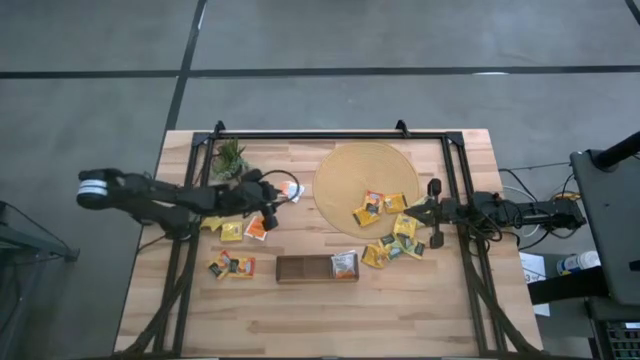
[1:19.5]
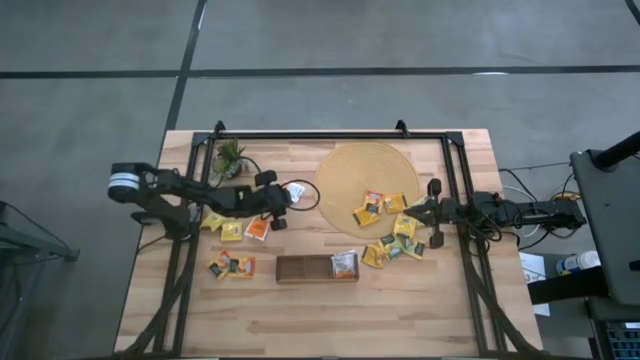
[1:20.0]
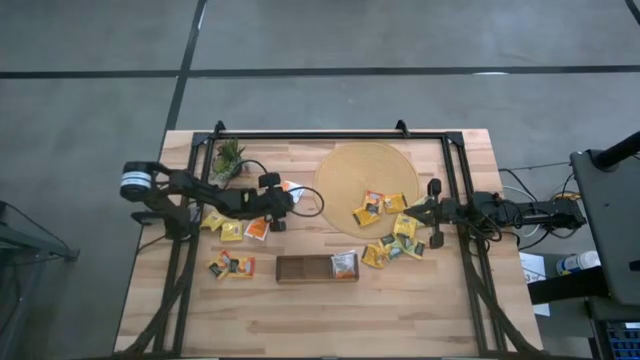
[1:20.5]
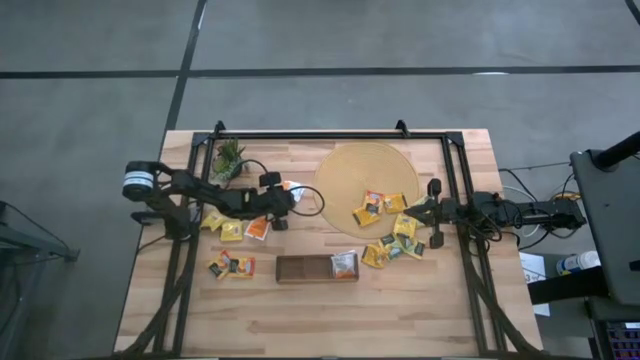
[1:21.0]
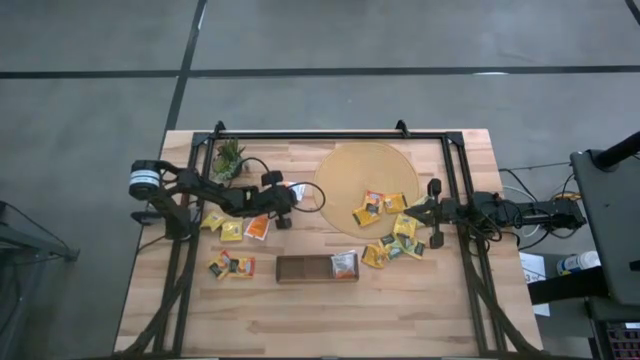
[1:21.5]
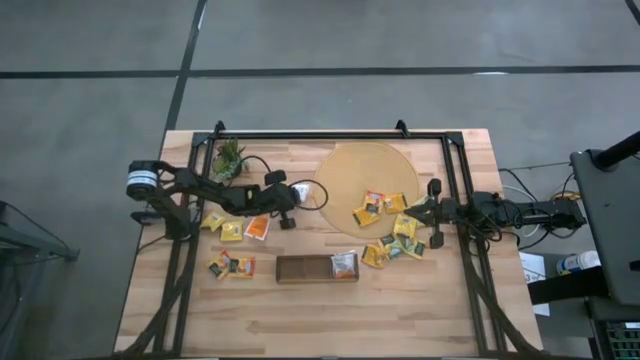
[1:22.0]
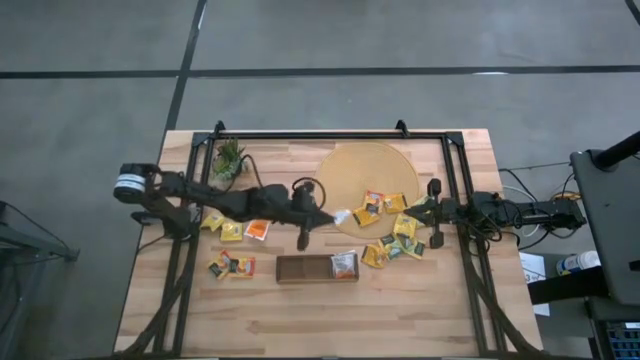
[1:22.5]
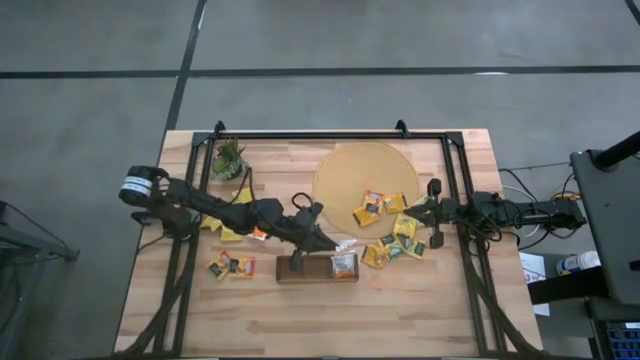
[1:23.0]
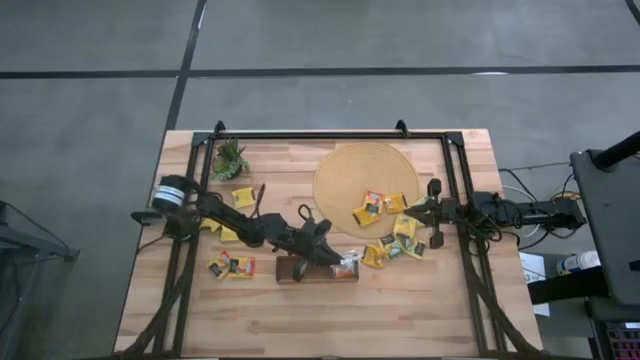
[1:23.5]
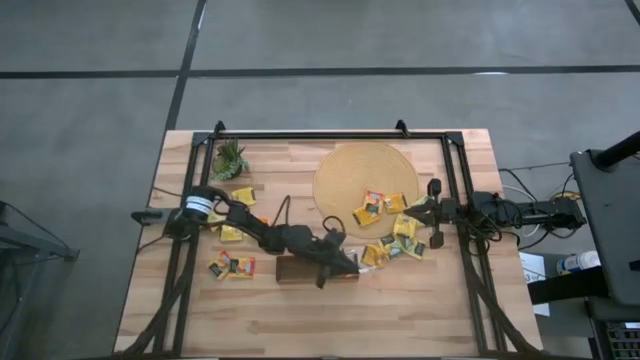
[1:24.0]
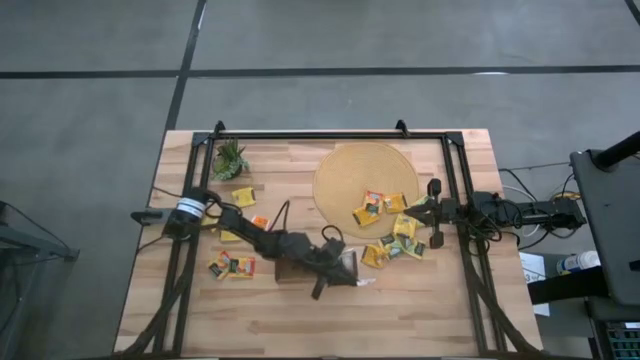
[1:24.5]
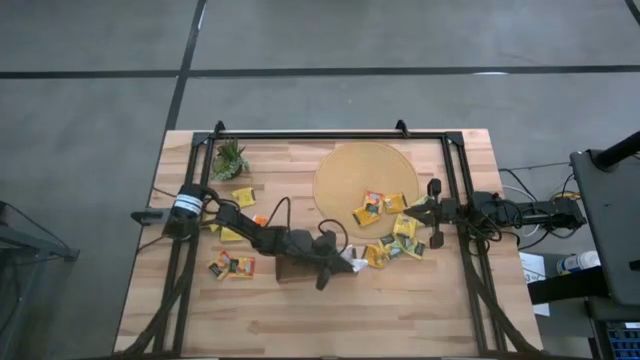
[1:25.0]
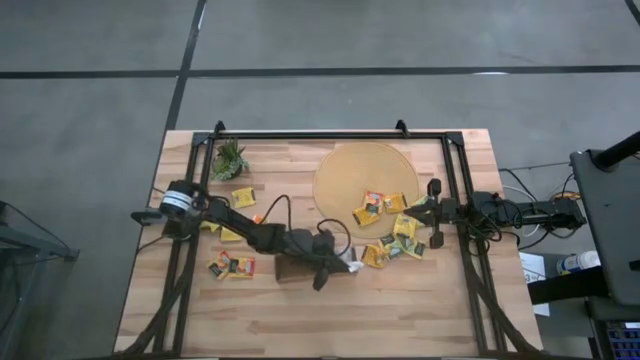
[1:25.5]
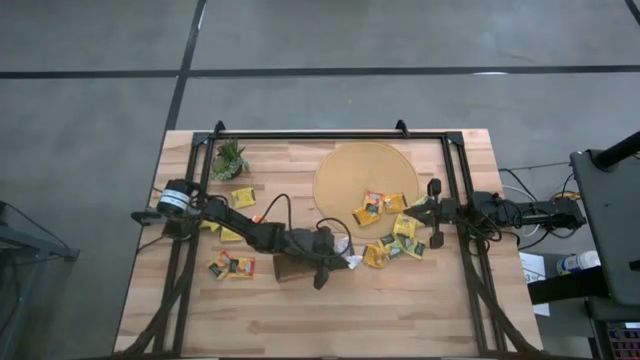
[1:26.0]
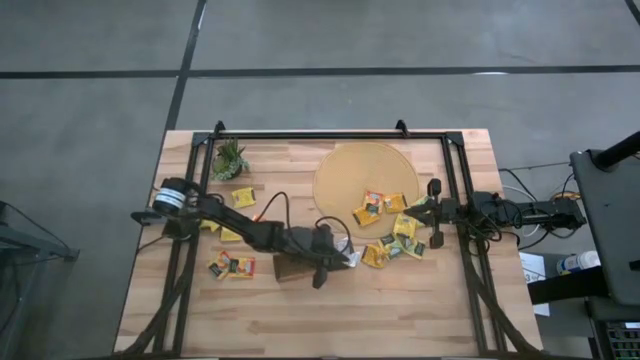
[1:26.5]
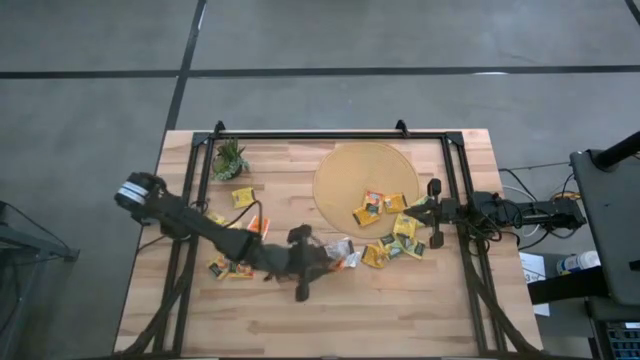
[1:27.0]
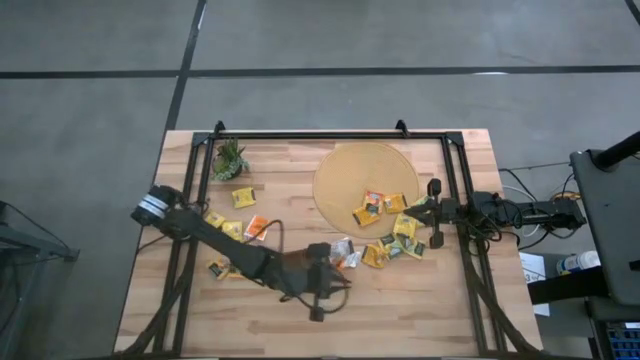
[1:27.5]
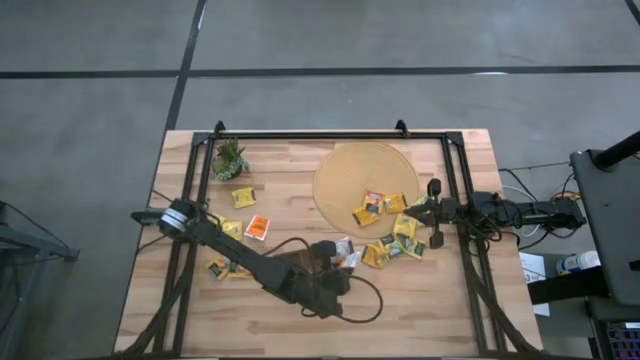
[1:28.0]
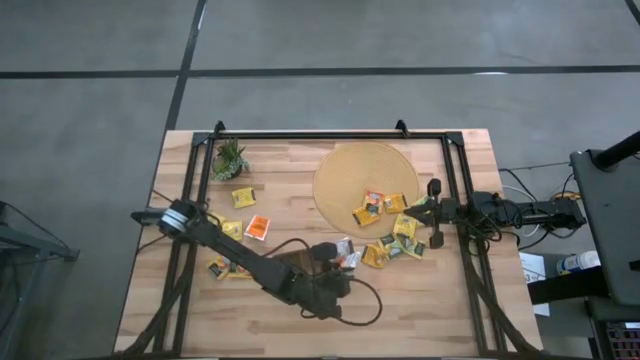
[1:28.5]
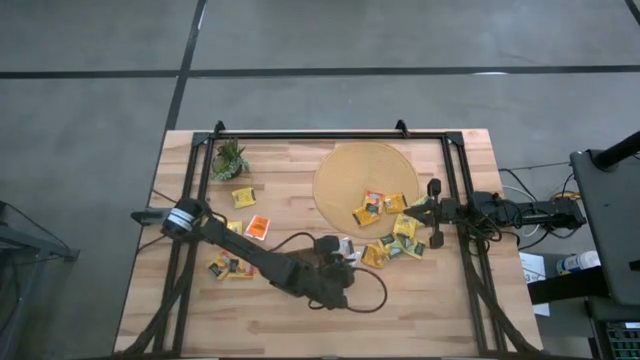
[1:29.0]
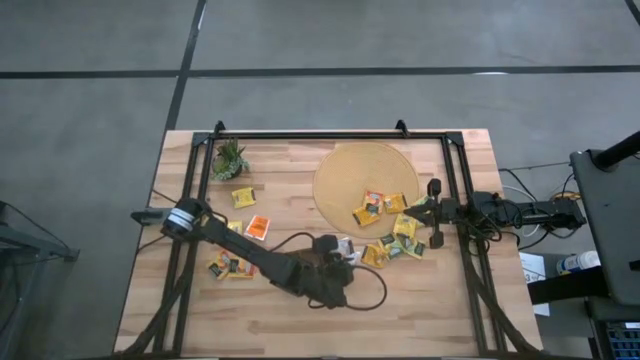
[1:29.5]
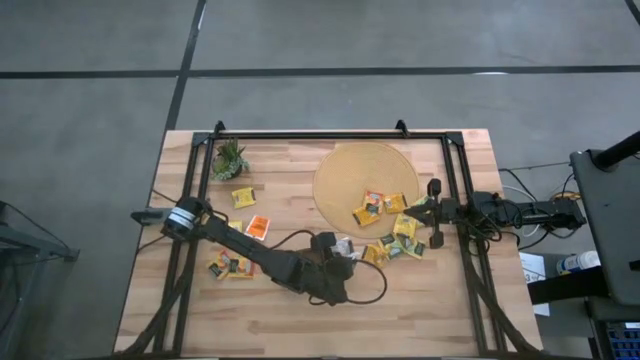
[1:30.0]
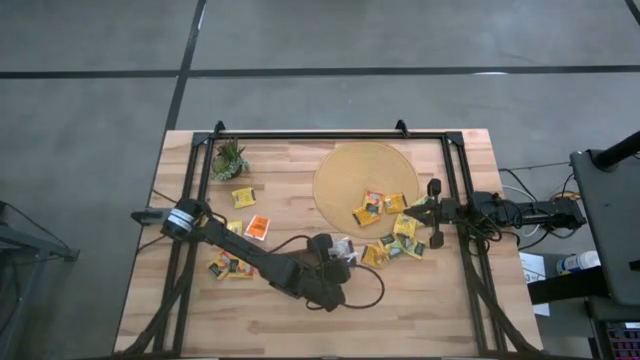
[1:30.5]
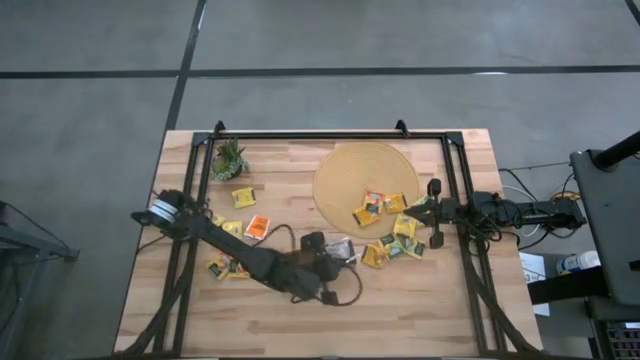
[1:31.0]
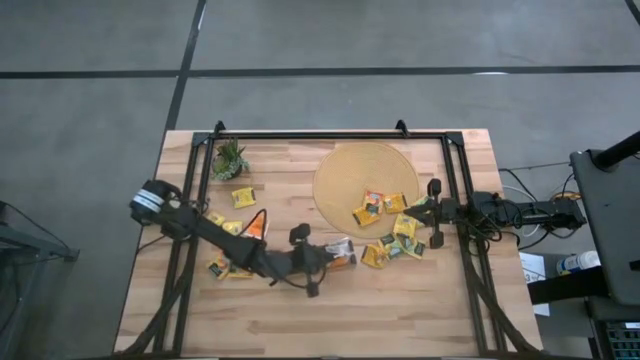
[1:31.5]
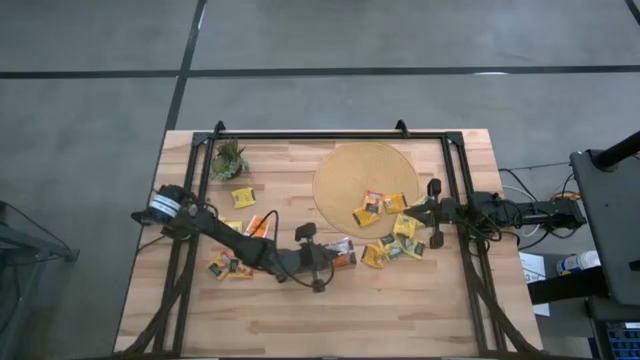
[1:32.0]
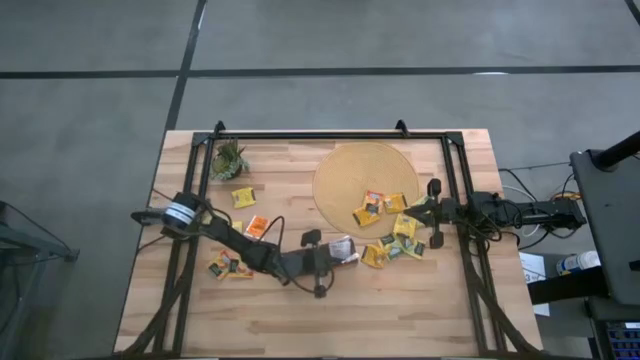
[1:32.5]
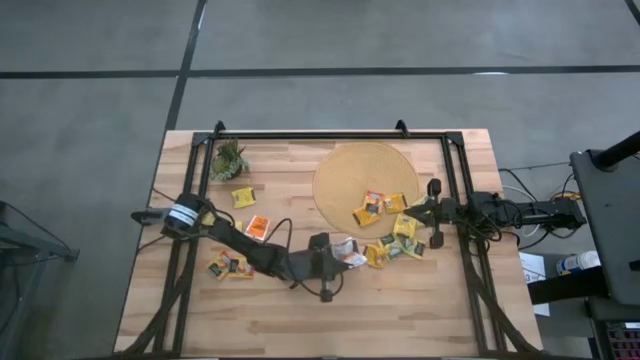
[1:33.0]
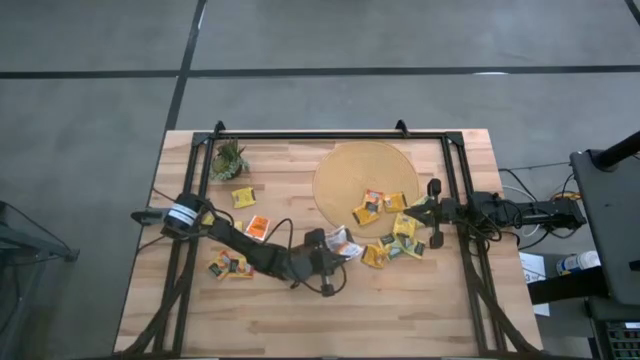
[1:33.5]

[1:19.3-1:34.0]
Task: Pick & Place Tea
Put the white tea bag into the right section of the wooden organizer

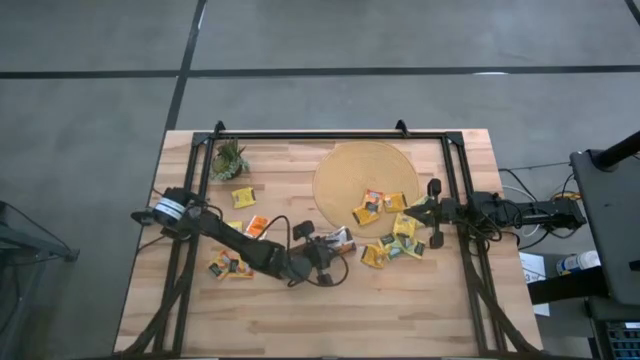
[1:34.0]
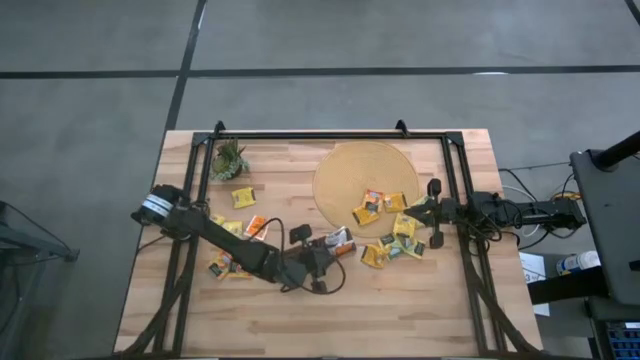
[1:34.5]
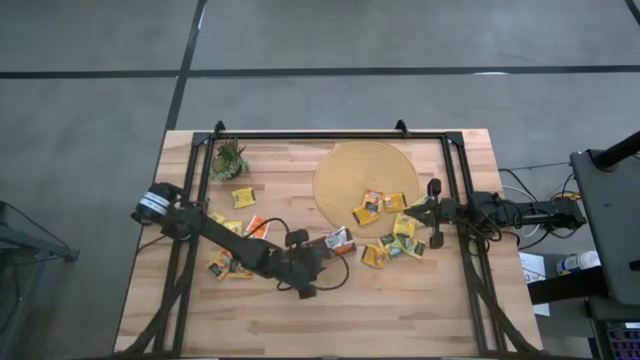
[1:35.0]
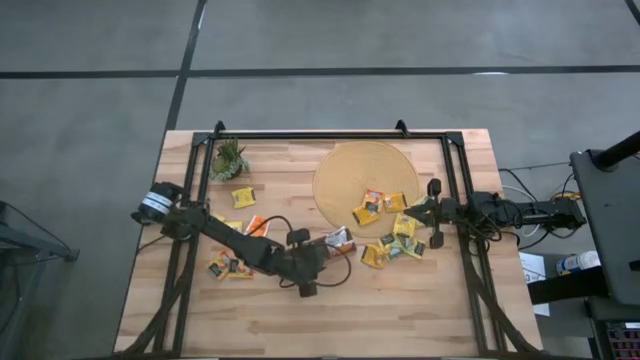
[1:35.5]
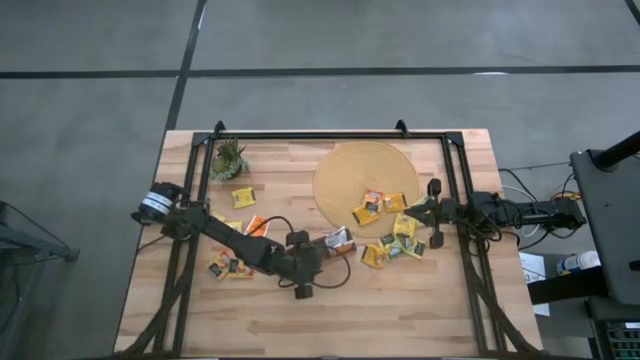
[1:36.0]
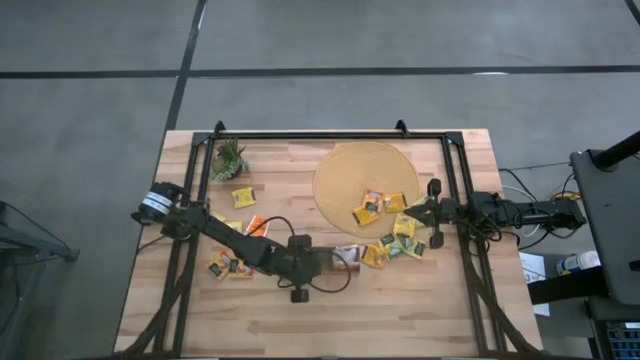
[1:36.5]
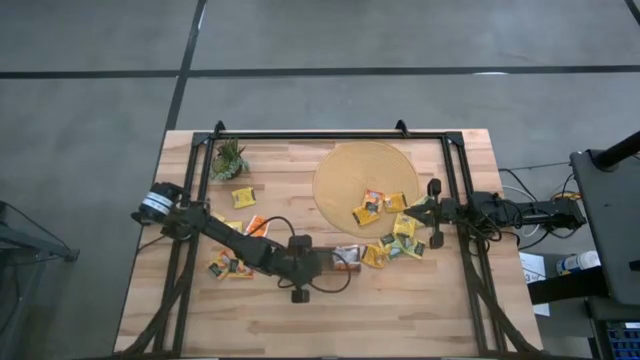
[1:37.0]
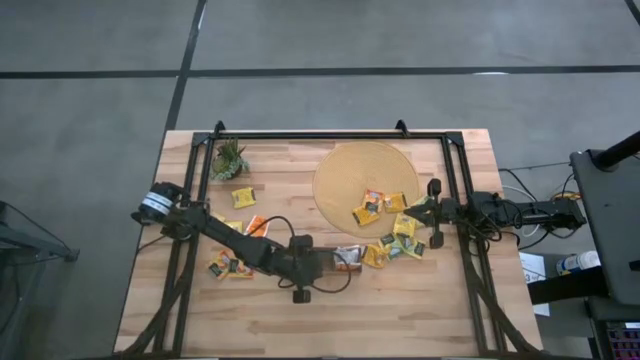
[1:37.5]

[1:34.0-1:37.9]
Adjust the the wooden organizer
